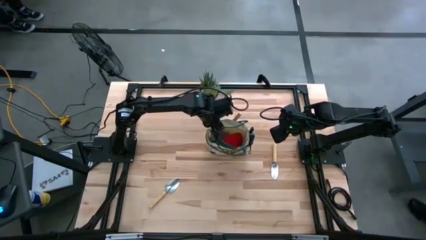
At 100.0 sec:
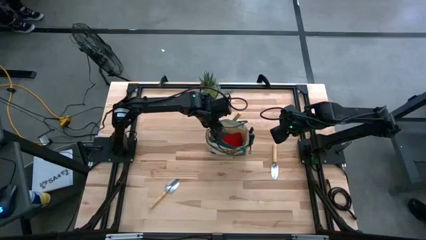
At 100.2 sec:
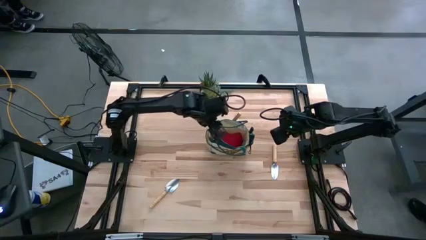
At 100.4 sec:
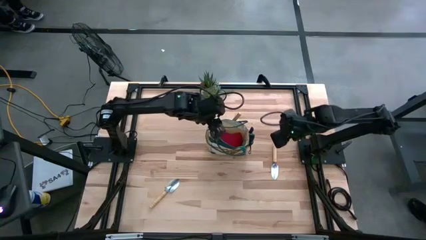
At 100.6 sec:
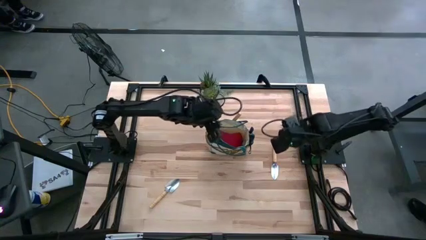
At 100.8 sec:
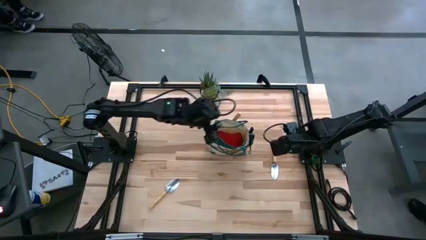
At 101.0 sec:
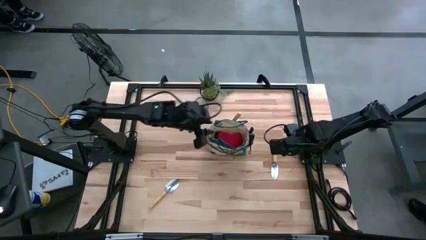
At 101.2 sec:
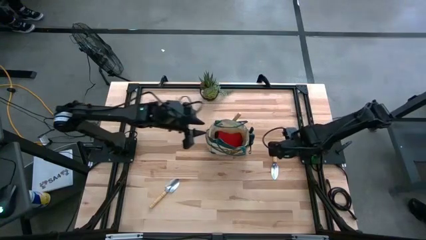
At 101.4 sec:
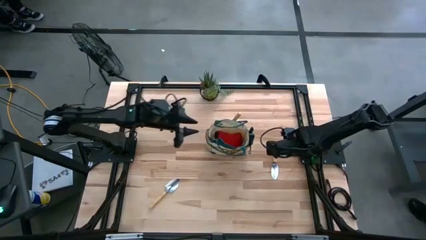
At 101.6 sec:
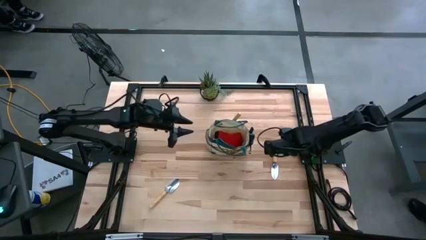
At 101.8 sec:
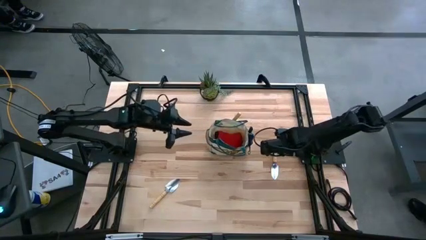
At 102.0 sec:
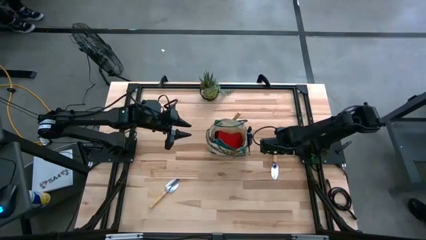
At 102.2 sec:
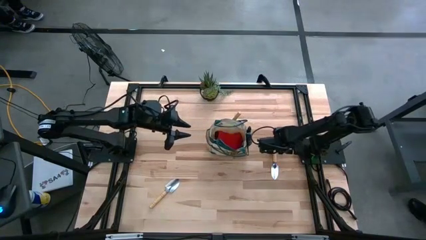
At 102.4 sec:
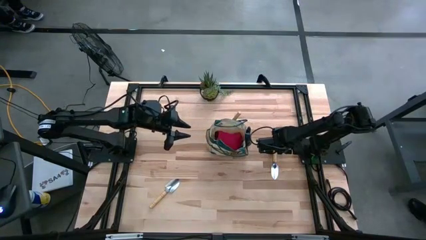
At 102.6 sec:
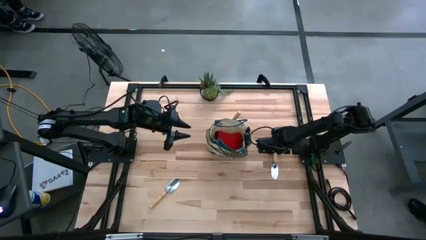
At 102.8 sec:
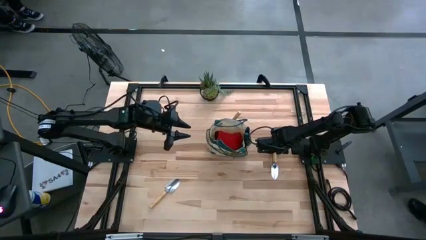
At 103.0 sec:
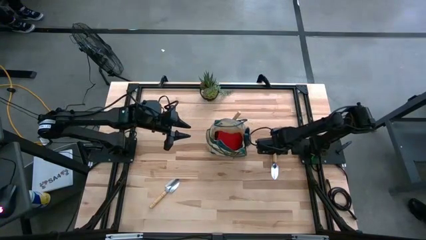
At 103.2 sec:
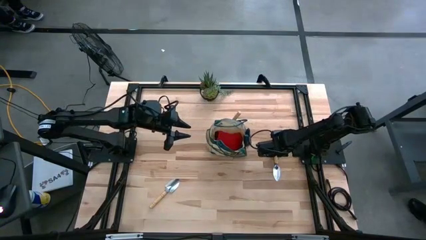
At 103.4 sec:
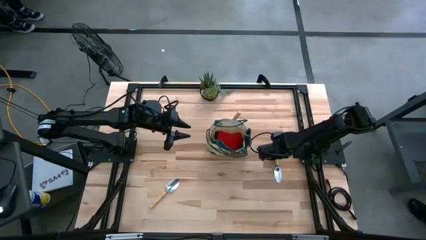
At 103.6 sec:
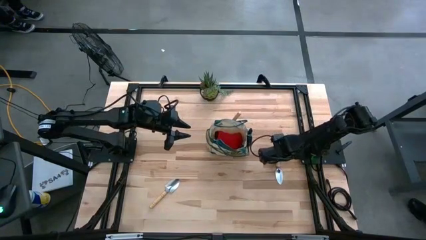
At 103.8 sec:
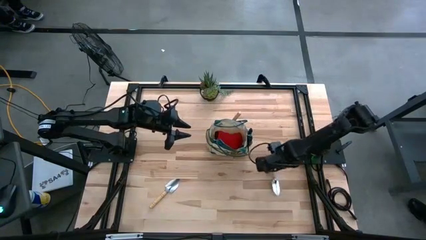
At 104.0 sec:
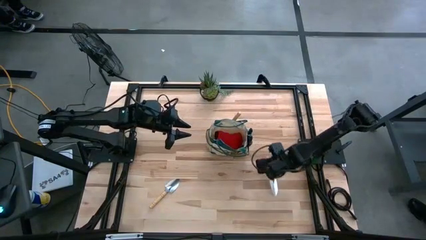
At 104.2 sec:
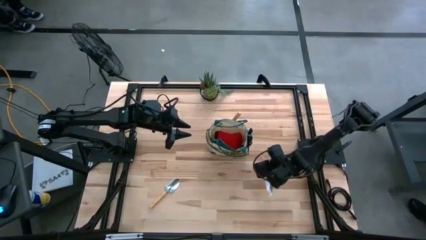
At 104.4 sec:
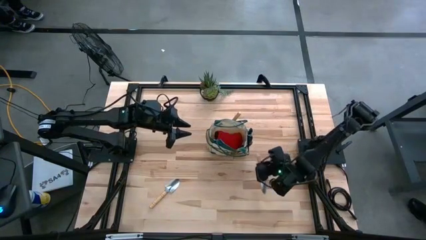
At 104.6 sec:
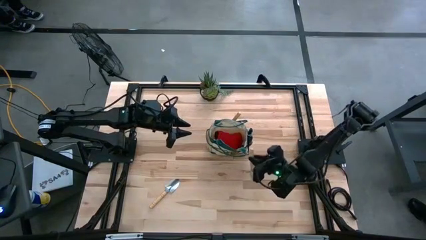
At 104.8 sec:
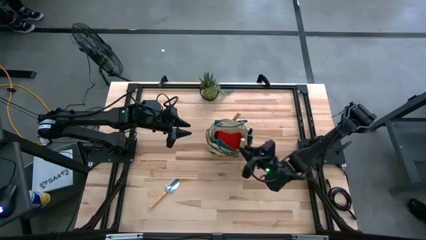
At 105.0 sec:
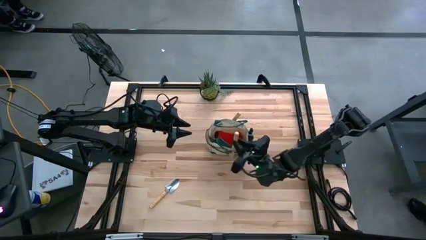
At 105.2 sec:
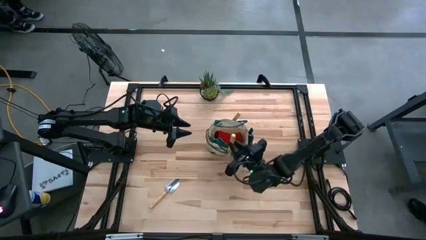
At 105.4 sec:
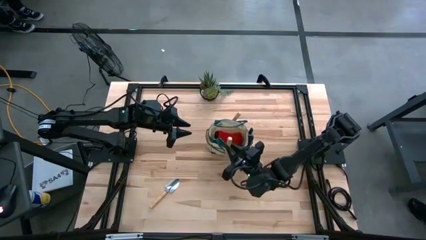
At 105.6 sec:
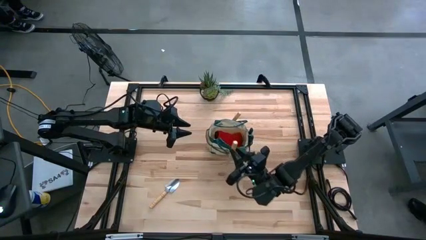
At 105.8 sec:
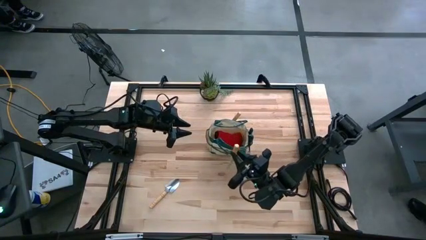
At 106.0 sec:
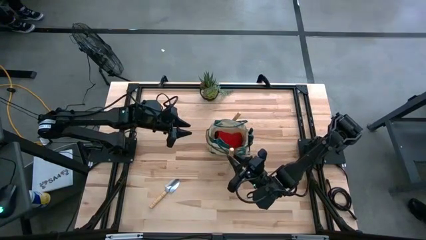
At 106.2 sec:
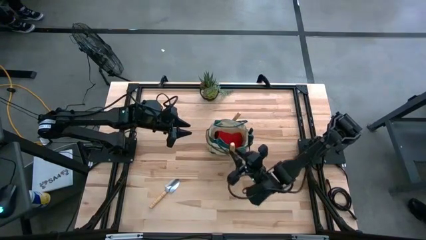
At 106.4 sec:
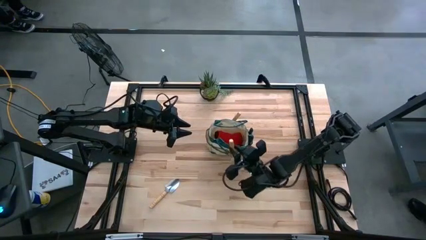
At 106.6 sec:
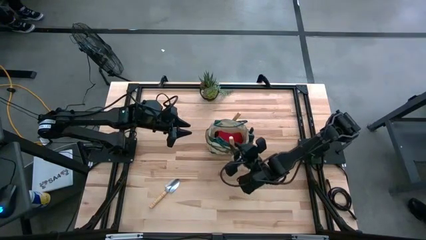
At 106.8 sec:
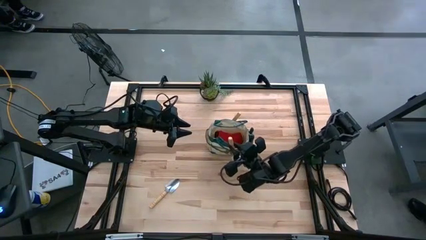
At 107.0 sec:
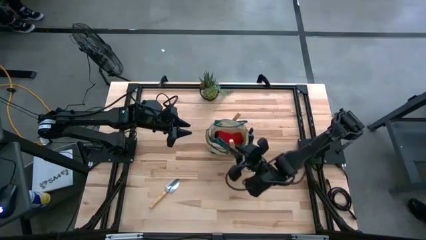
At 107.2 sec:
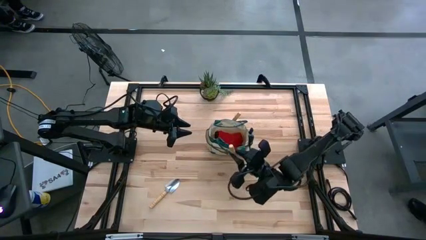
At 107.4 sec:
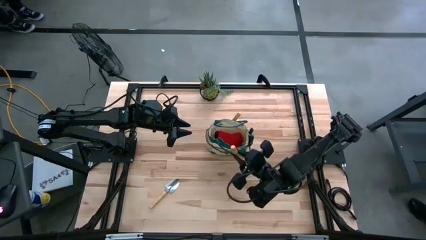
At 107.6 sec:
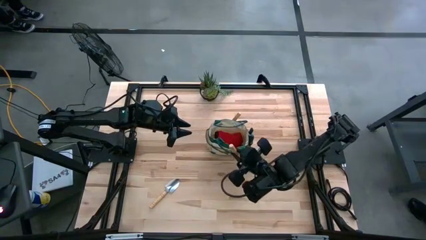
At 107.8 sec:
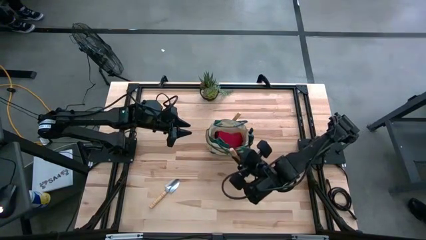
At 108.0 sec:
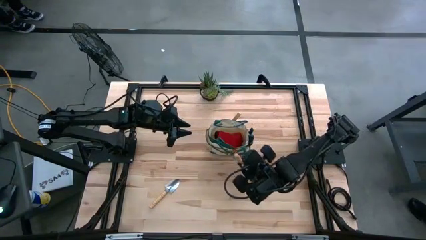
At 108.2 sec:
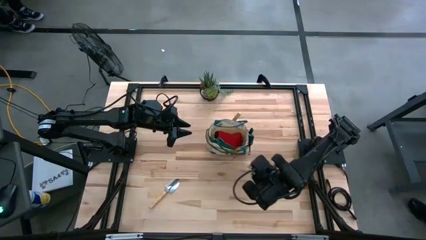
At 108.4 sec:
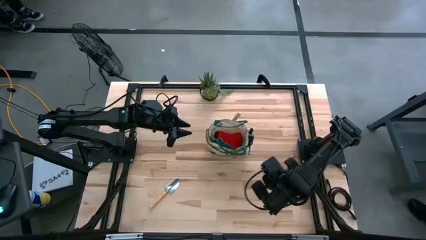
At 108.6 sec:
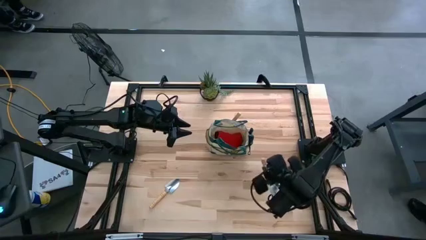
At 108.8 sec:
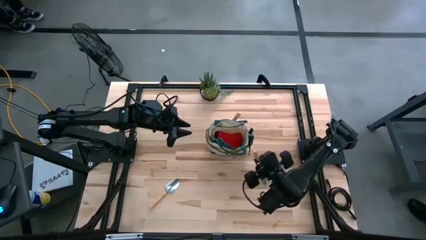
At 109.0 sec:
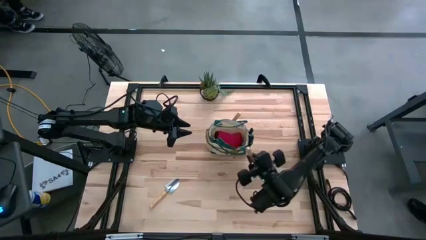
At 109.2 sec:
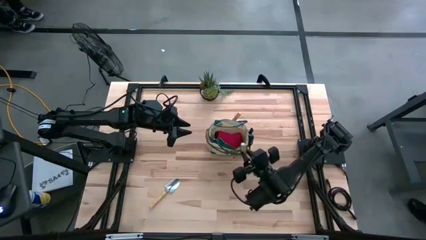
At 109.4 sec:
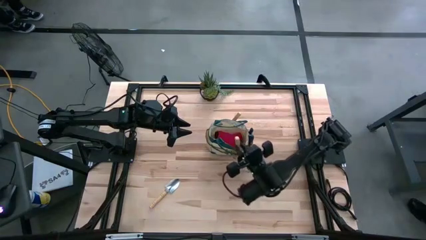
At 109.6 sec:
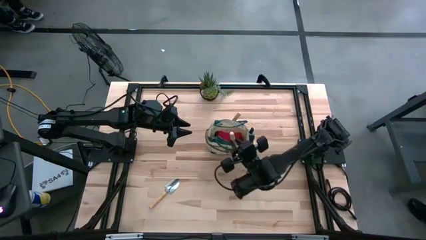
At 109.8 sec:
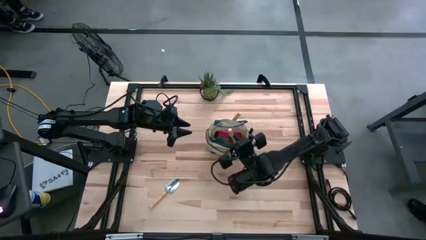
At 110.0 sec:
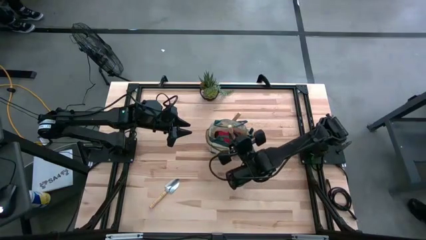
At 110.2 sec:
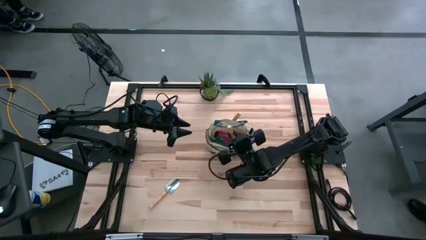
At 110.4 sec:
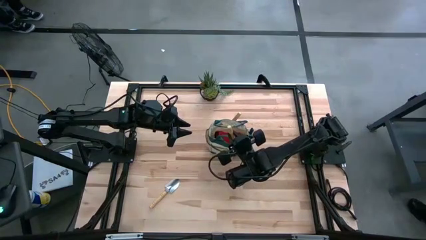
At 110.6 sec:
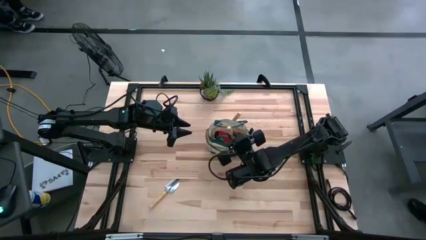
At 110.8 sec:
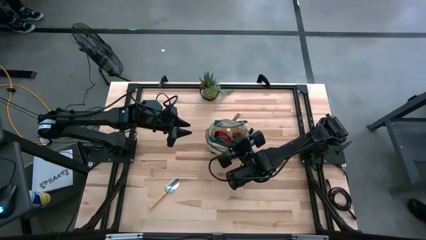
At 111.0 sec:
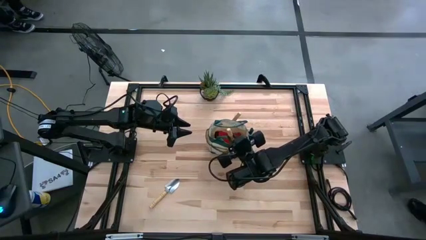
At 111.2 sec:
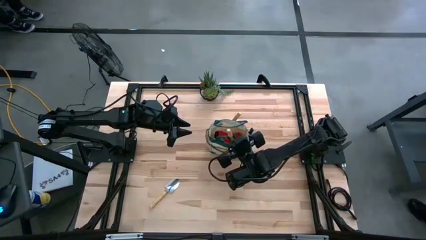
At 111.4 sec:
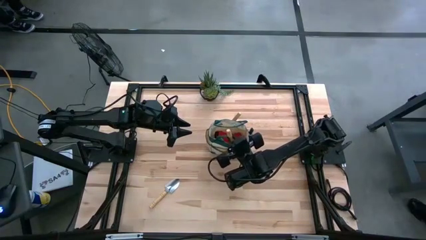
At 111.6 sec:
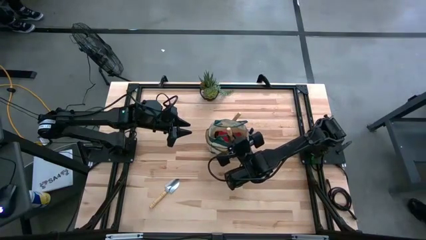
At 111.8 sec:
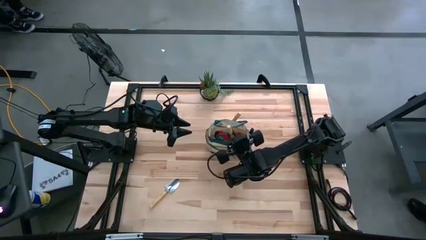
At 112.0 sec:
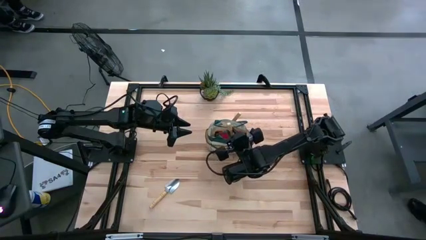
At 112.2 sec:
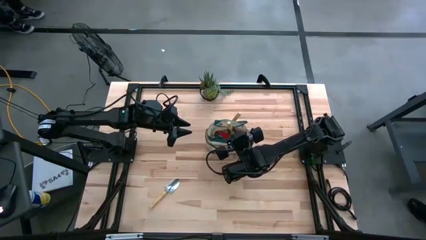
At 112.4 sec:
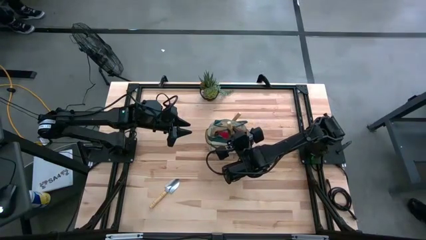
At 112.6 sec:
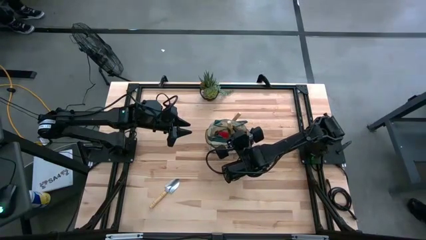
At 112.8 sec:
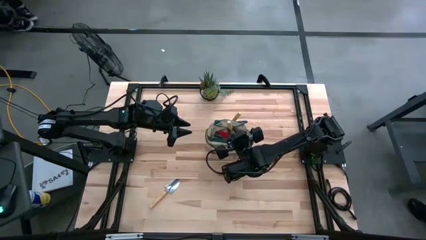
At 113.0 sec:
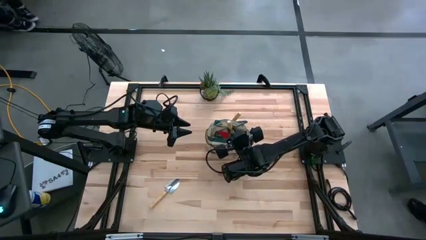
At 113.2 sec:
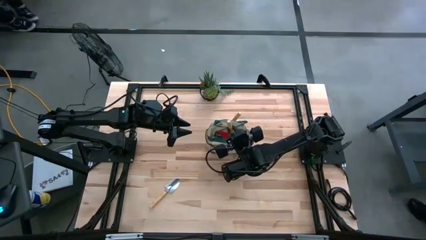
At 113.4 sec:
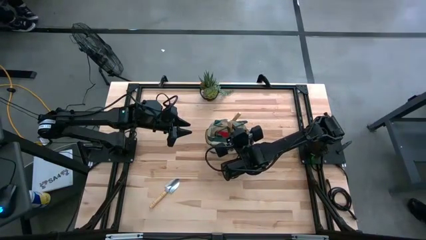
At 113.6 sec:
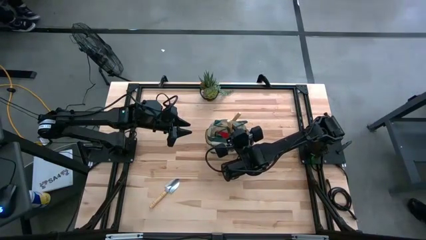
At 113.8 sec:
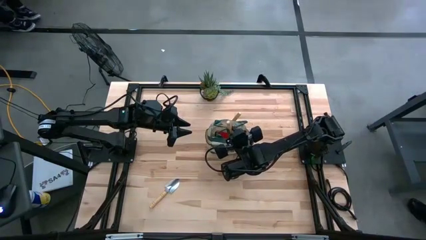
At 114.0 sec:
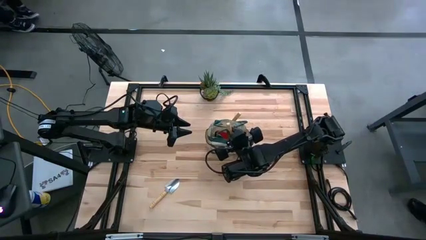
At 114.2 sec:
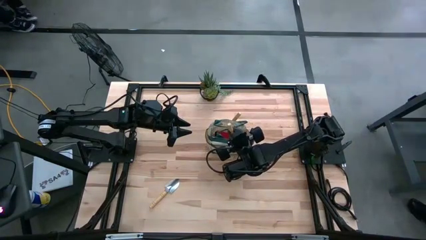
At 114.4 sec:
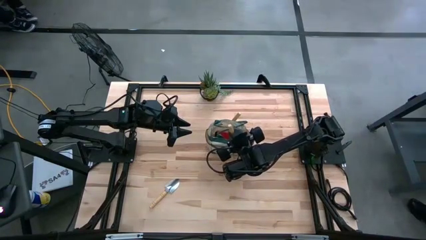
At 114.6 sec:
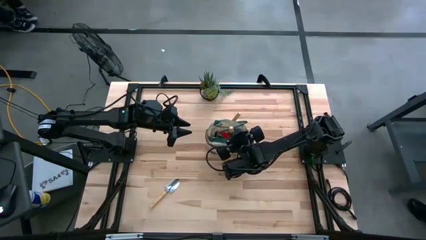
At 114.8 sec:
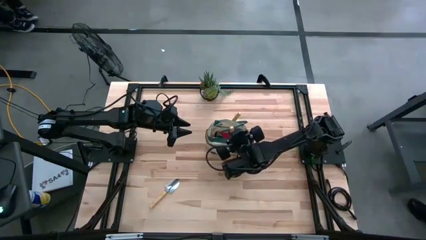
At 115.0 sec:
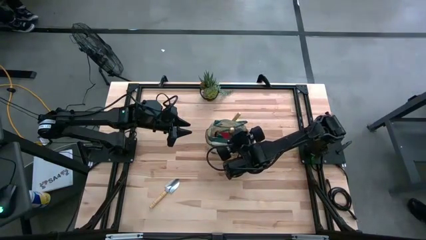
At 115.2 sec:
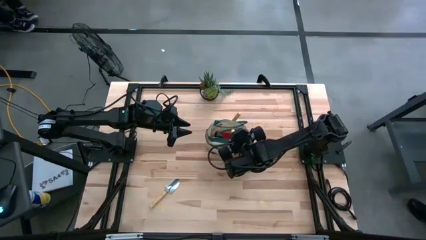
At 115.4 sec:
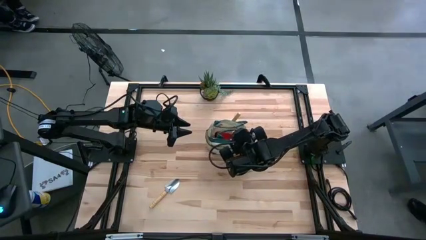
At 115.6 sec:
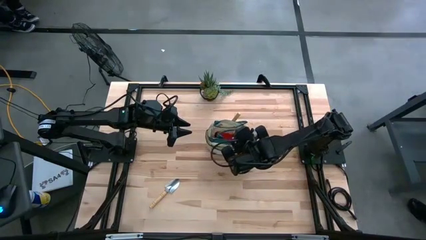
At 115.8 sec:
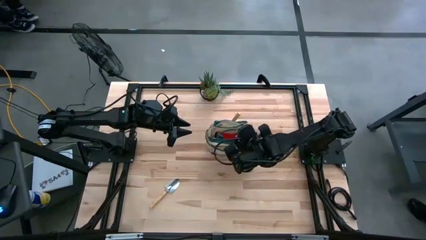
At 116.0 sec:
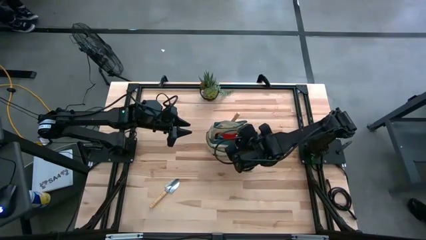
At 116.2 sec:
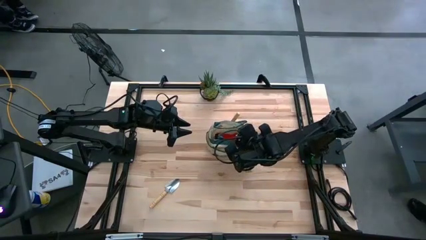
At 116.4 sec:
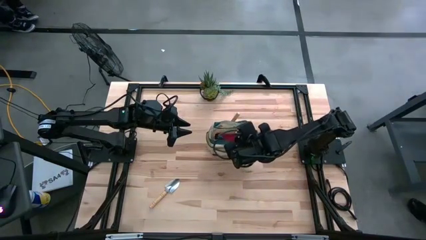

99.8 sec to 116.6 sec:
Task: Pick & Place Garden tools in Gardening bag
Put the right light brown trowel into the light brown gardening bag
